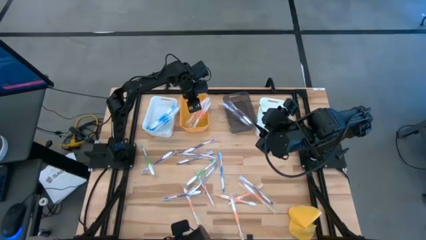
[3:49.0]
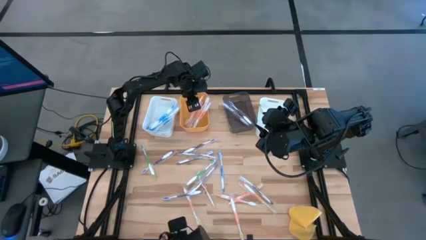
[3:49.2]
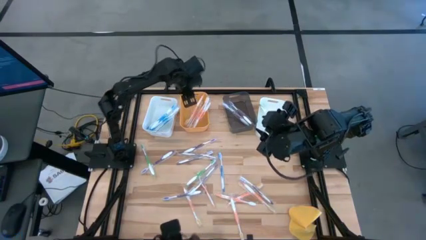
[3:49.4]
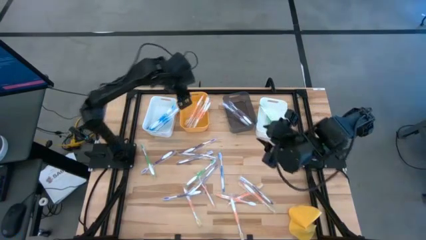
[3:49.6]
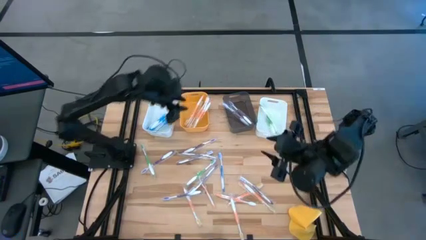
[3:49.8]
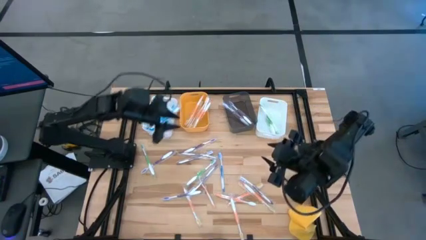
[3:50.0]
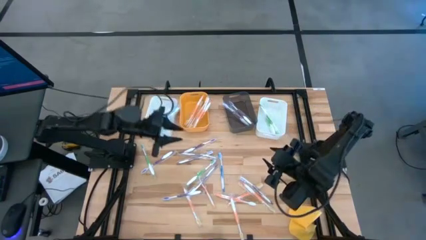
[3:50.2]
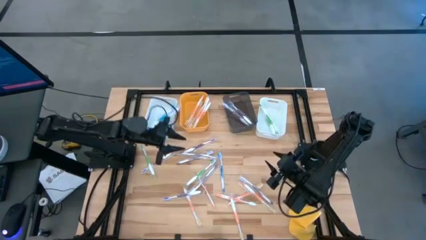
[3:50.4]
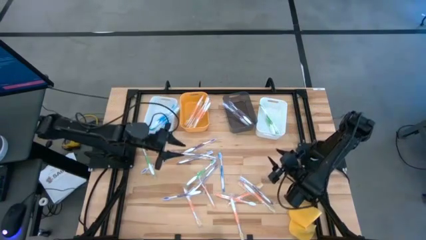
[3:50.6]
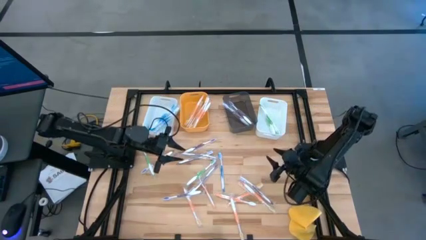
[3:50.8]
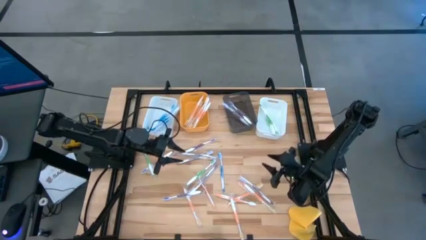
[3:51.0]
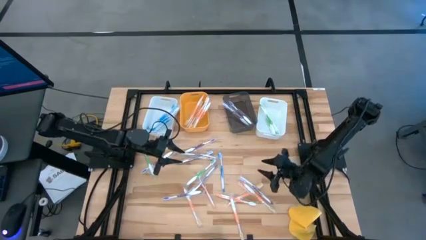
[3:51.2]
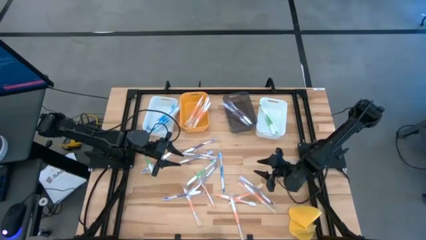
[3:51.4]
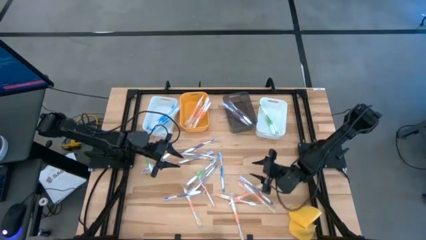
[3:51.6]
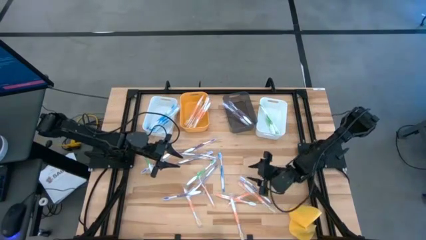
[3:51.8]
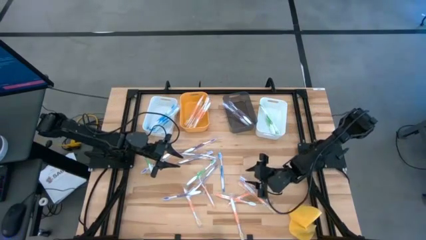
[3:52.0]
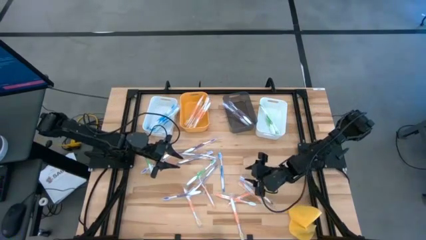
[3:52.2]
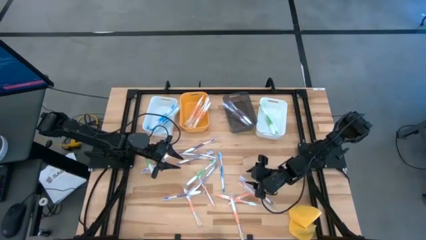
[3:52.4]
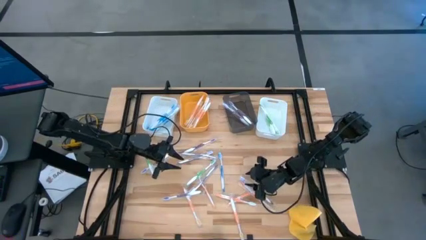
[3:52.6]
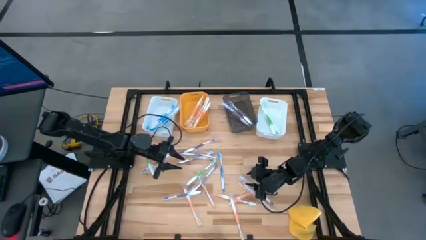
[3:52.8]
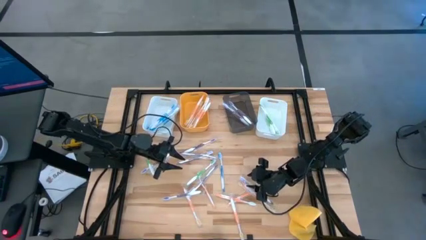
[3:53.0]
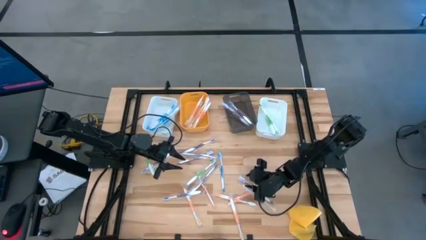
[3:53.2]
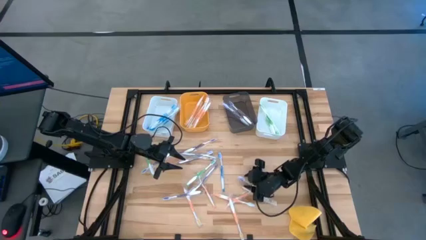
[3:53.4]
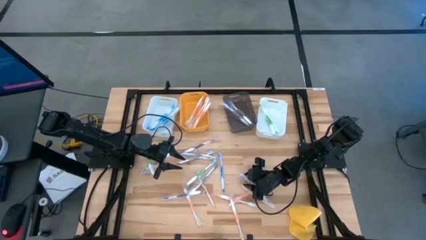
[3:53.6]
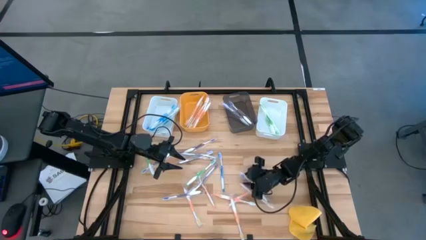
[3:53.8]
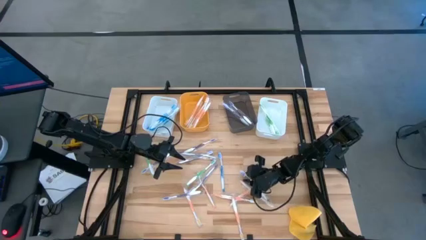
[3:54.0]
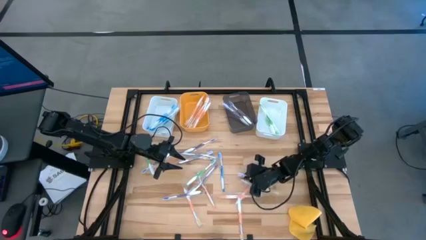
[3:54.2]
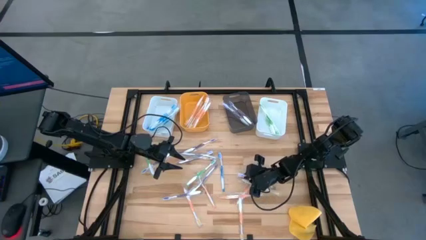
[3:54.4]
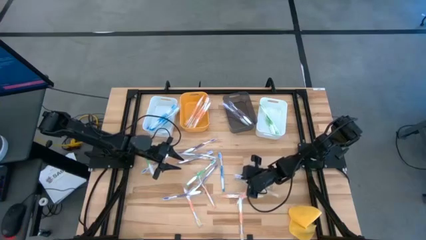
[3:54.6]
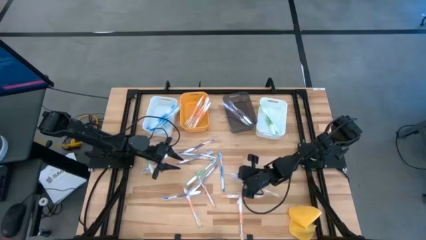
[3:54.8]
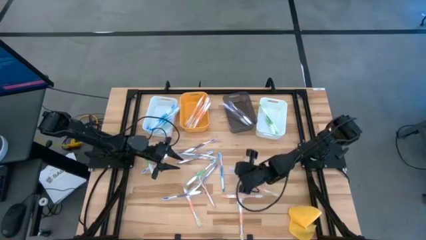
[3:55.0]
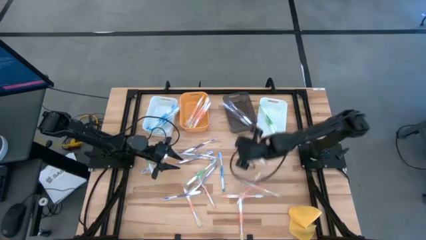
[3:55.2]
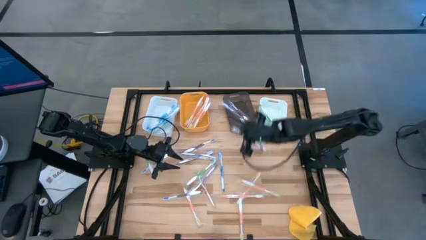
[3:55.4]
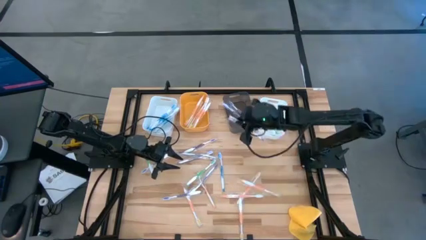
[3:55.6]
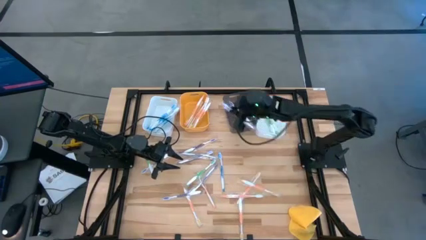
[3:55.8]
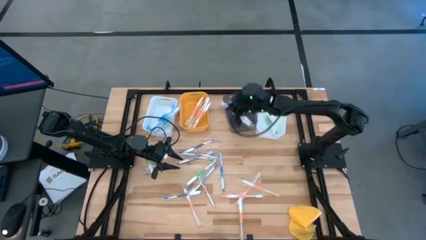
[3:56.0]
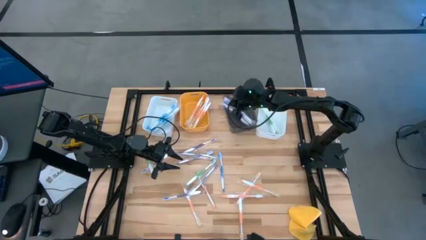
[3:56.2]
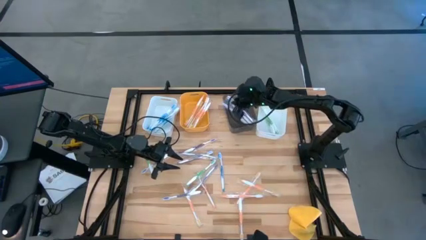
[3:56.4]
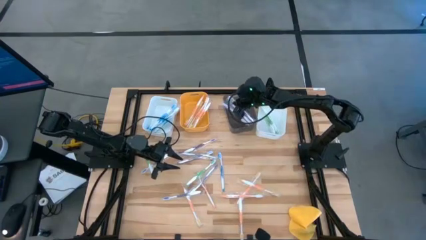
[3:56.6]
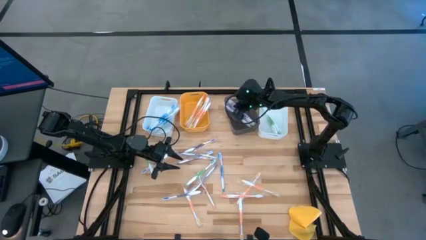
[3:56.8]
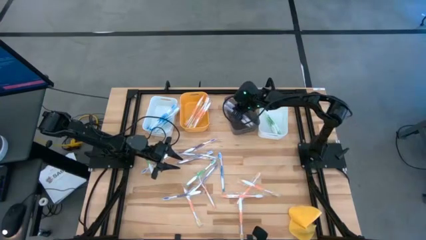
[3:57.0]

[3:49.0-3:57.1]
Task: Pick & Place Toothbrushes
Put the violet toothbrush into the gray bin

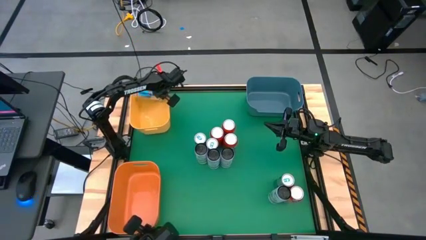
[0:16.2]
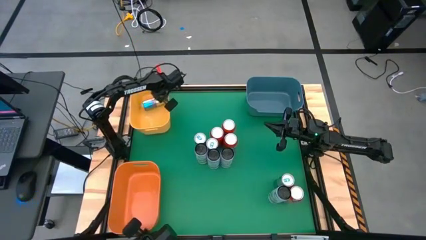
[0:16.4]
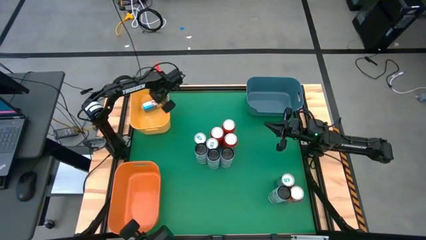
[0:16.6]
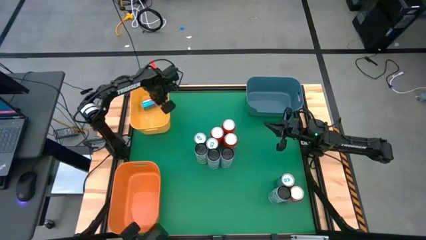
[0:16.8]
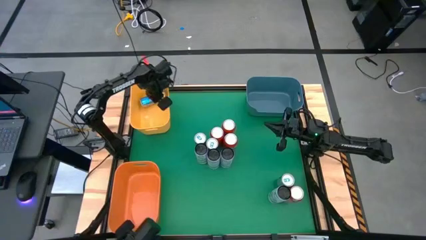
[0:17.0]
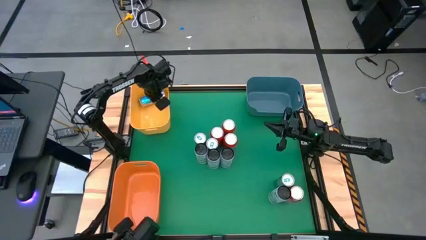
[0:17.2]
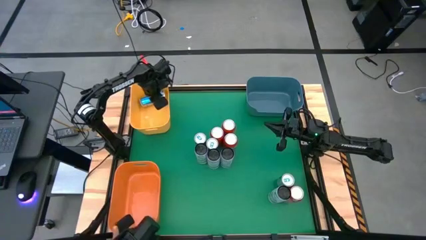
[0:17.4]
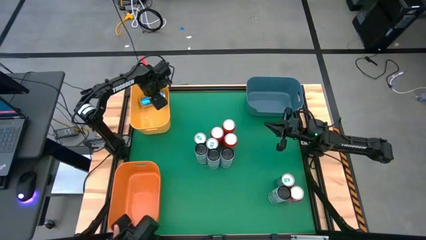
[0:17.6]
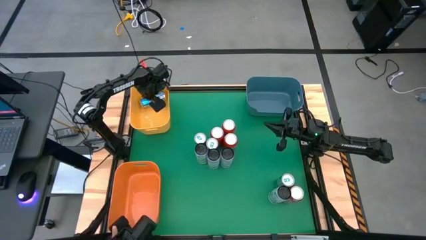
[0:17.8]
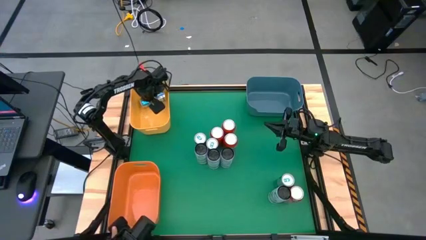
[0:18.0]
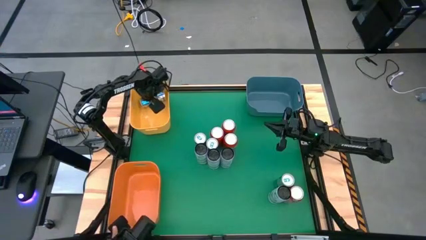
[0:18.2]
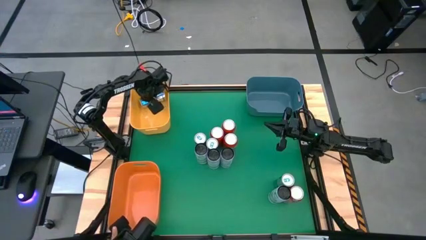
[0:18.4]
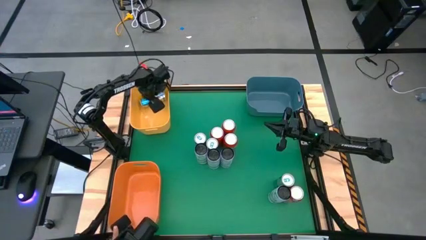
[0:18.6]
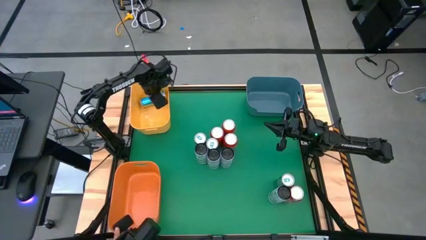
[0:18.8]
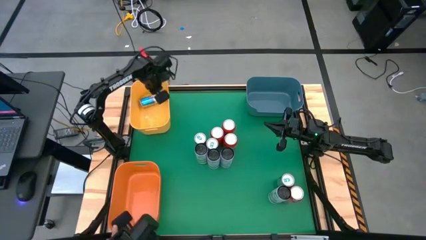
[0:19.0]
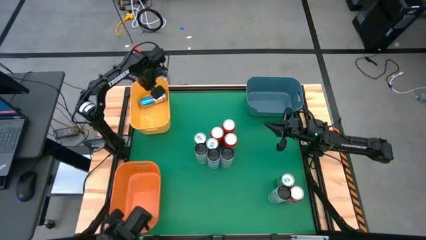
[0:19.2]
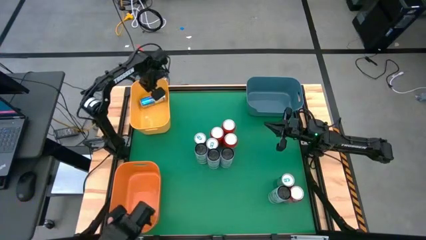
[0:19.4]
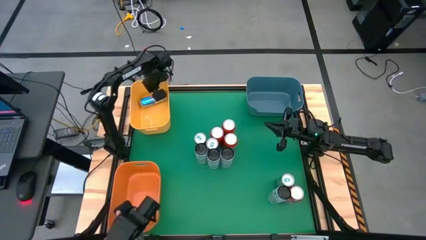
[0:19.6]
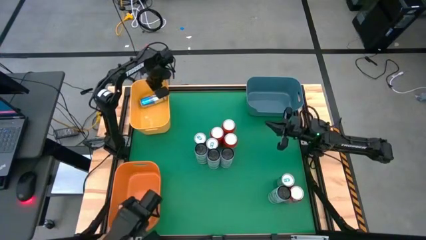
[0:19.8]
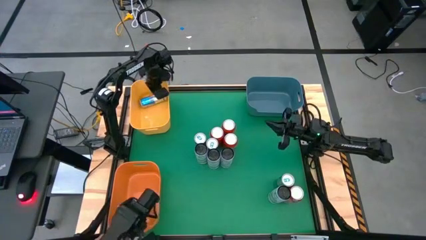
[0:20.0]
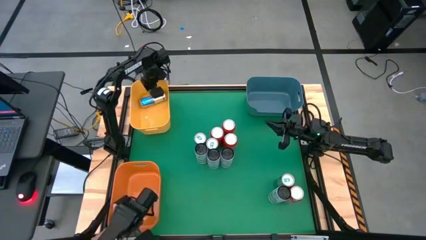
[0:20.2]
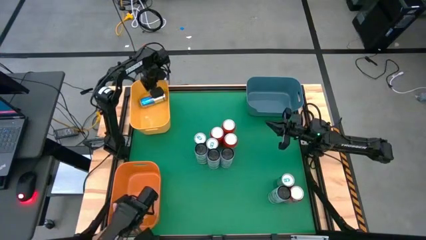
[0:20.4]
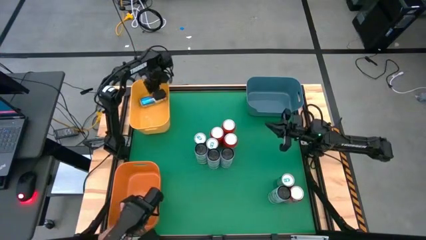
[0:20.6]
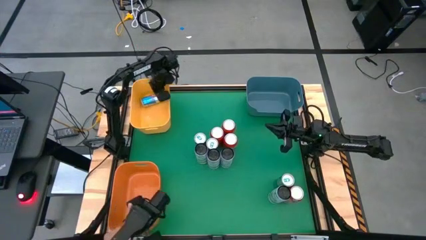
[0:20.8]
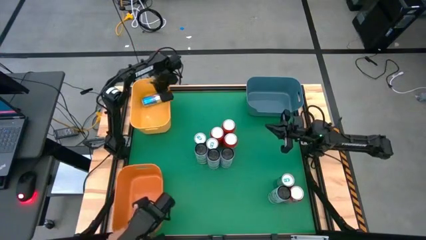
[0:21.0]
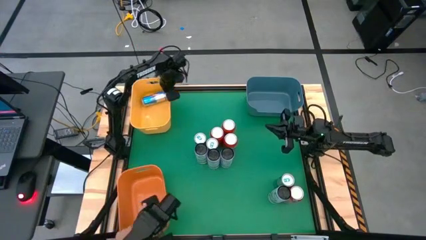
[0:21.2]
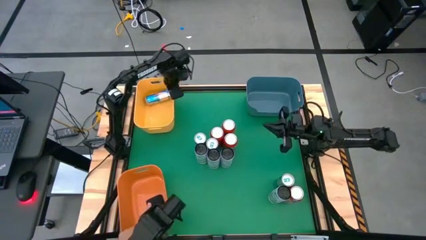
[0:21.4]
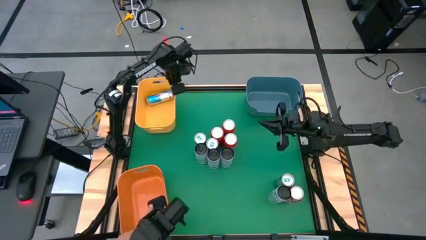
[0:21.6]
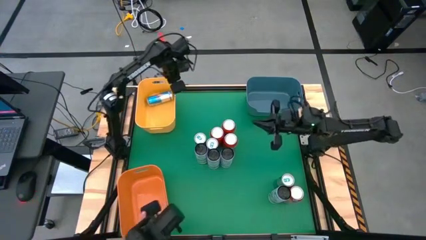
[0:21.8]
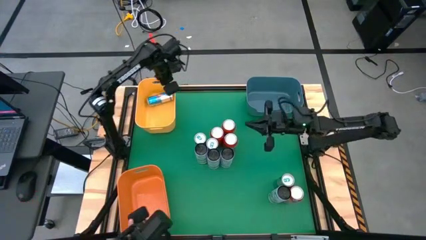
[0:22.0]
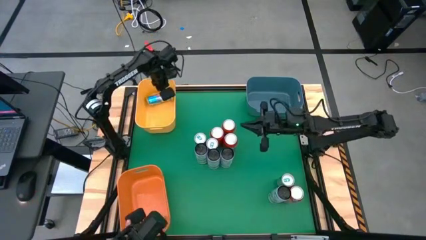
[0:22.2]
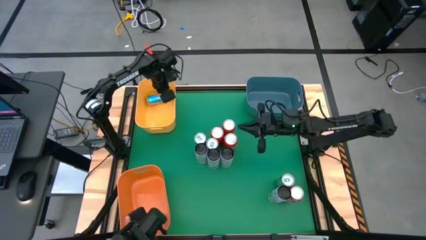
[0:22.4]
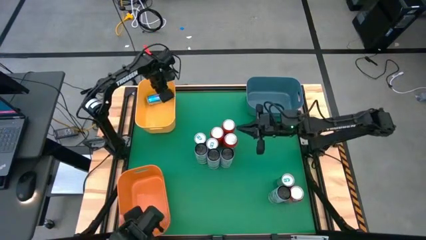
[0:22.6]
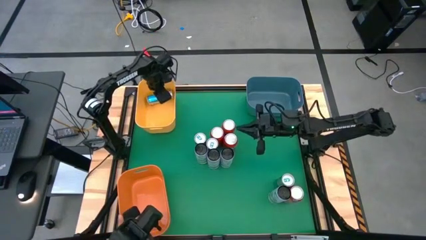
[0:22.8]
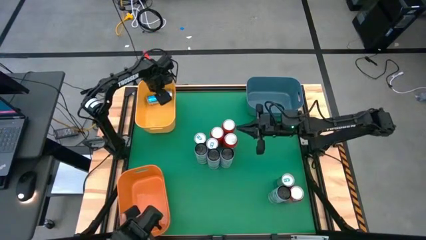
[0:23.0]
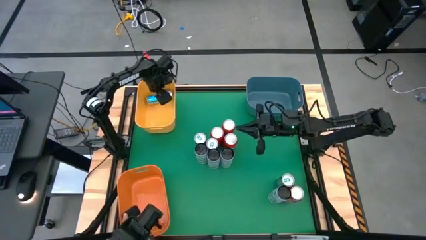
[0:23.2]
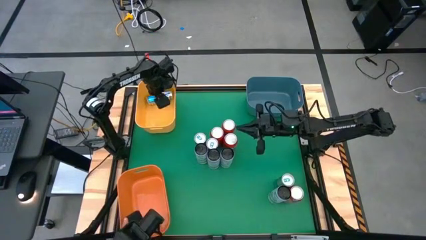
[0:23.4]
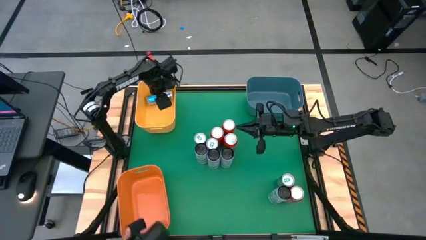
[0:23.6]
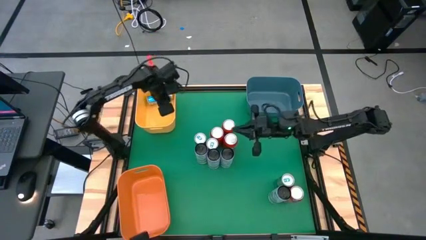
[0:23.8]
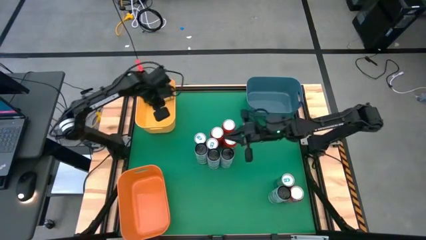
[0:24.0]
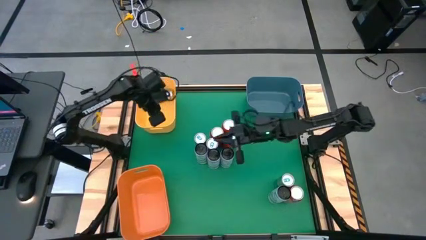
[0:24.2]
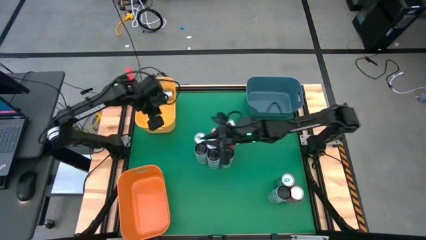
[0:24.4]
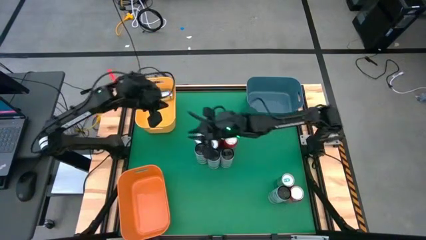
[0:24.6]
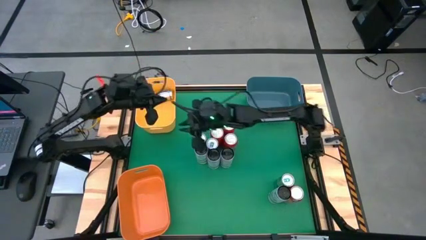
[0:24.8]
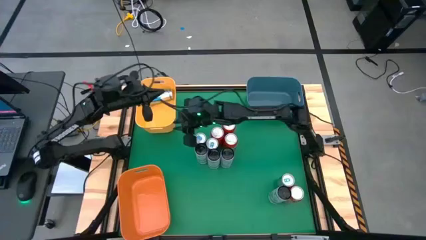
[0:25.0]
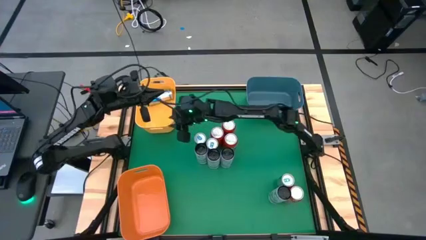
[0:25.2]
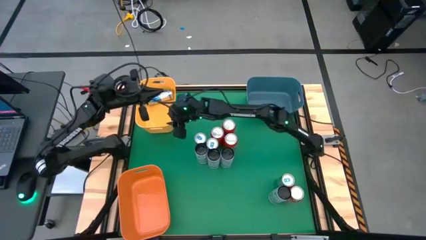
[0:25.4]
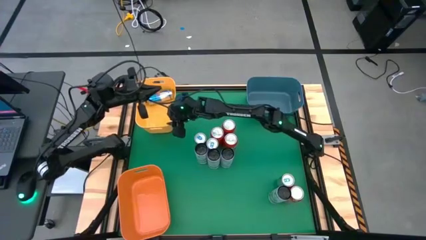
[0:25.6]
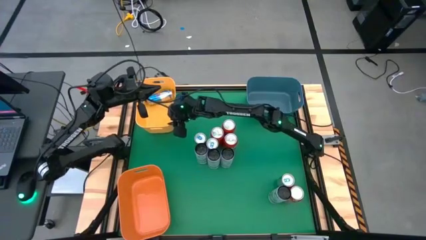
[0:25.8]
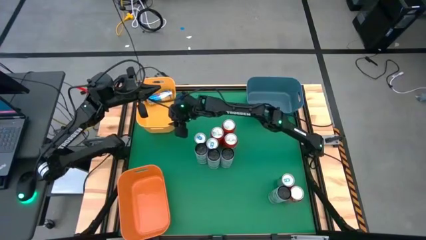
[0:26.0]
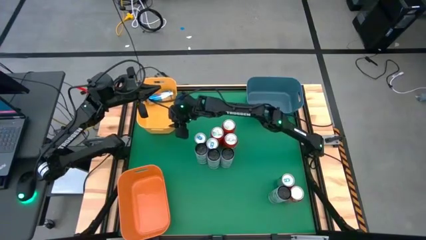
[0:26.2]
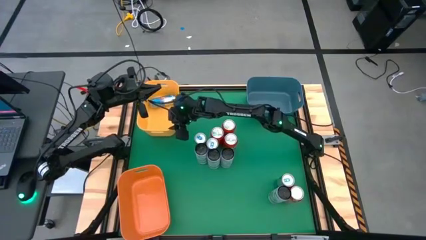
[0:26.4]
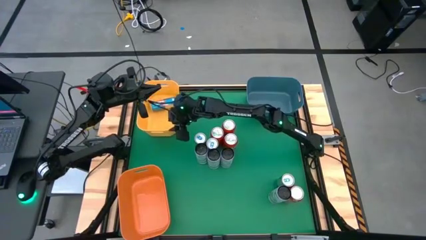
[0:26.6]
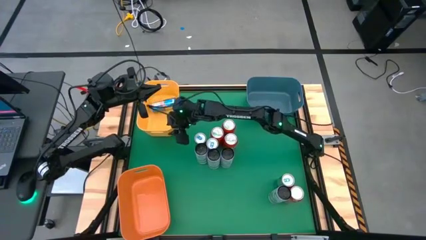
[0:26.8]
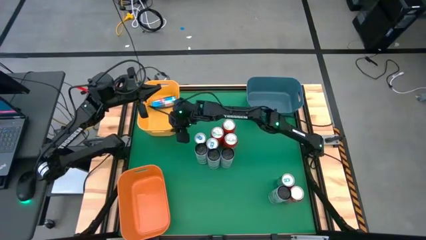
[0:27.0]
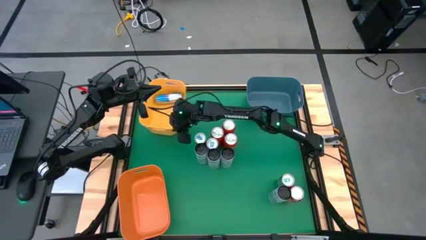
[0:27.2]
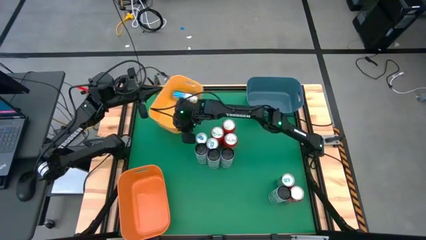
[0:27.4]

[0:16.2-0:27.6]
Task: Sort soda cans
Remove the blue soda can from the yellow bin
